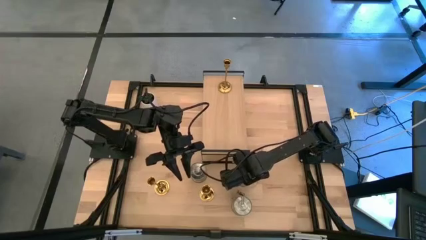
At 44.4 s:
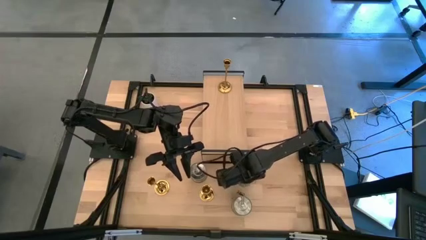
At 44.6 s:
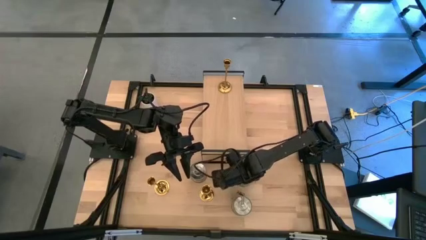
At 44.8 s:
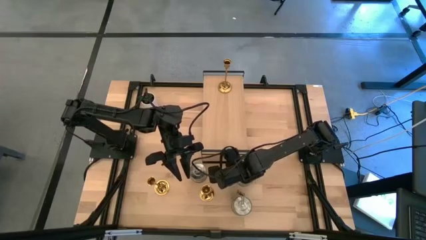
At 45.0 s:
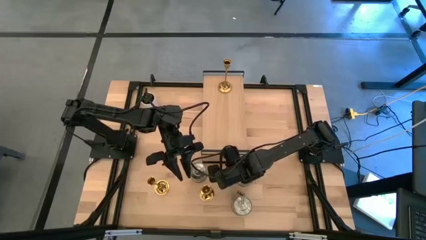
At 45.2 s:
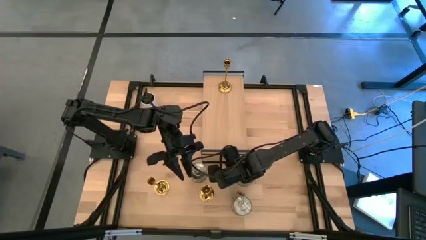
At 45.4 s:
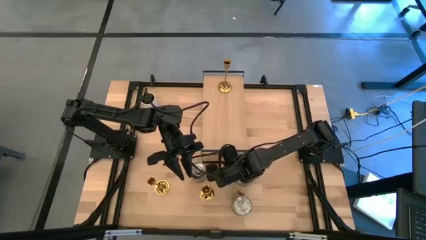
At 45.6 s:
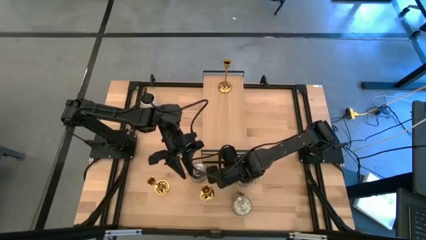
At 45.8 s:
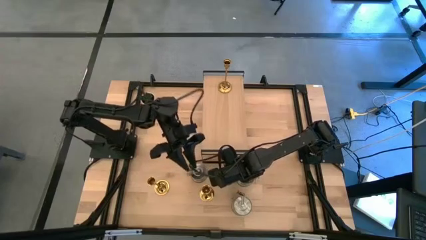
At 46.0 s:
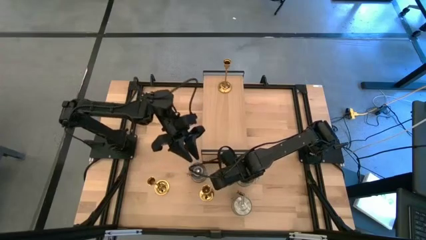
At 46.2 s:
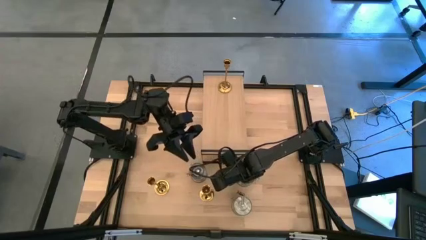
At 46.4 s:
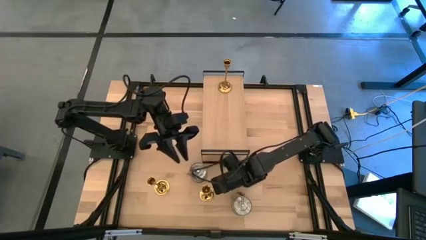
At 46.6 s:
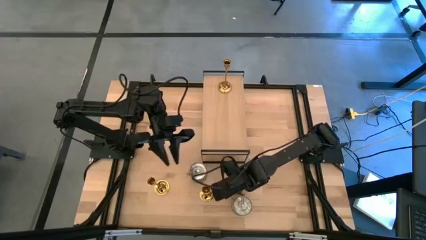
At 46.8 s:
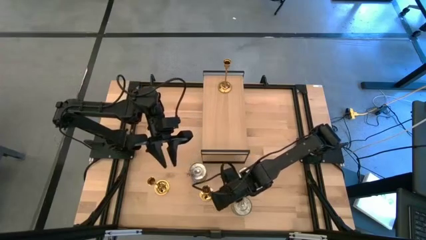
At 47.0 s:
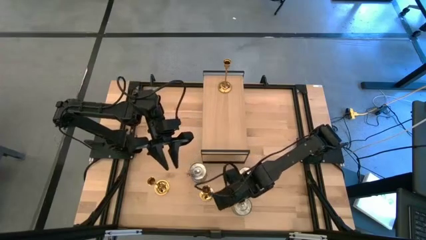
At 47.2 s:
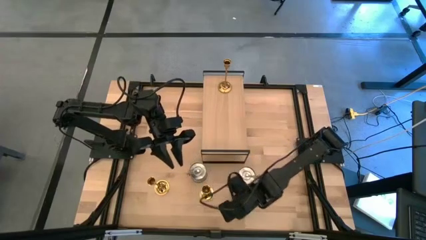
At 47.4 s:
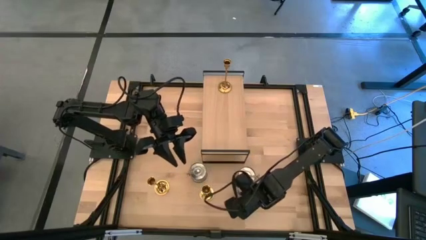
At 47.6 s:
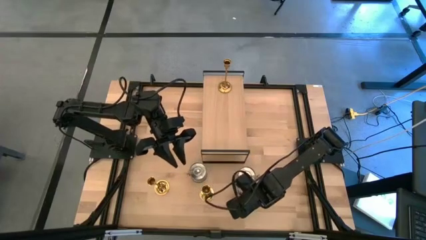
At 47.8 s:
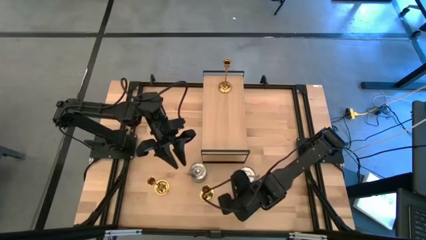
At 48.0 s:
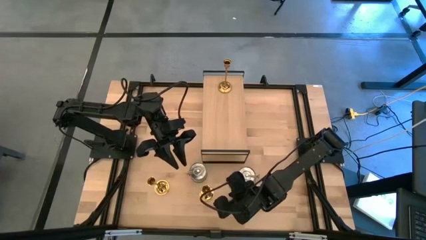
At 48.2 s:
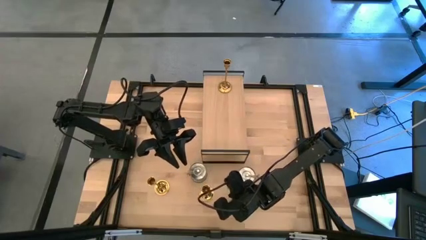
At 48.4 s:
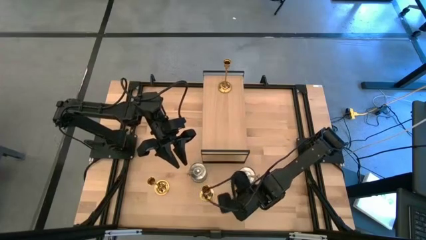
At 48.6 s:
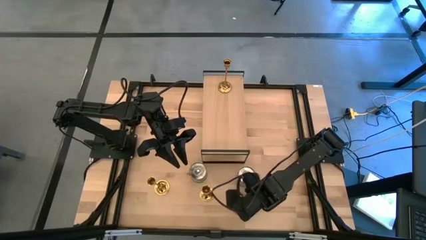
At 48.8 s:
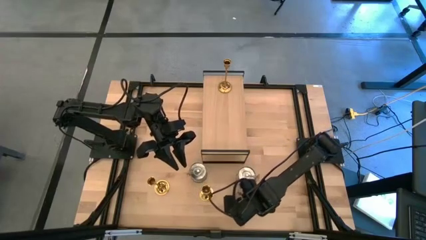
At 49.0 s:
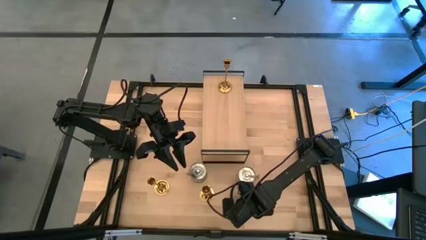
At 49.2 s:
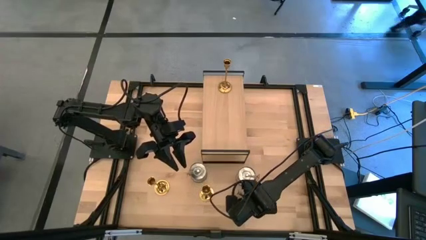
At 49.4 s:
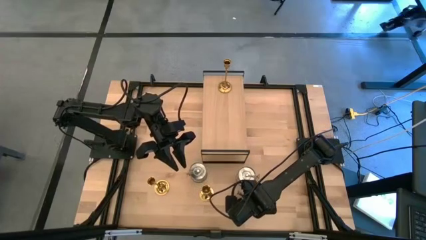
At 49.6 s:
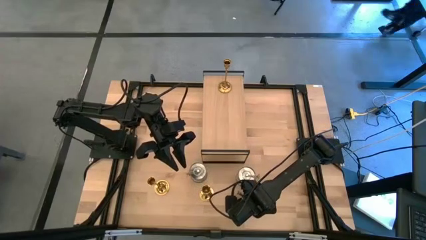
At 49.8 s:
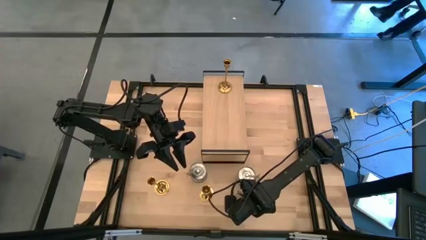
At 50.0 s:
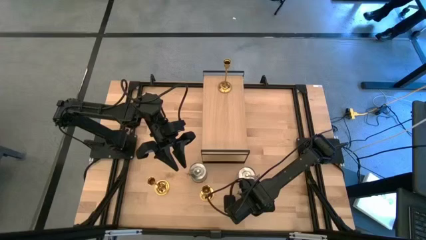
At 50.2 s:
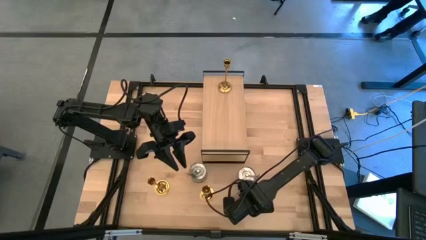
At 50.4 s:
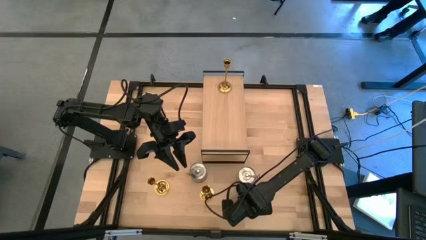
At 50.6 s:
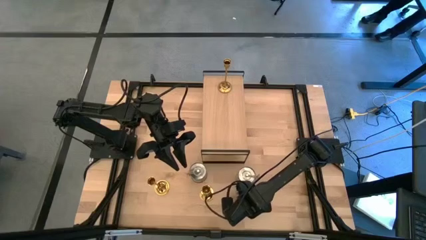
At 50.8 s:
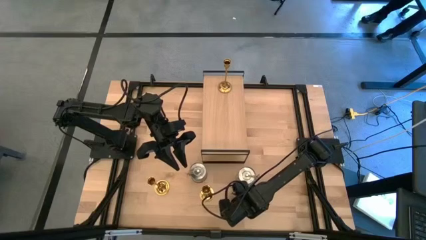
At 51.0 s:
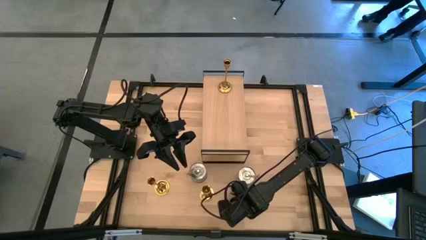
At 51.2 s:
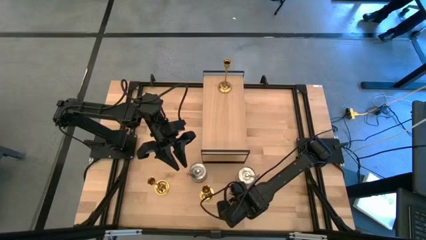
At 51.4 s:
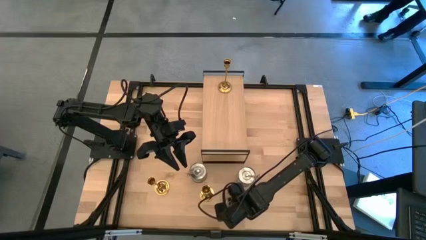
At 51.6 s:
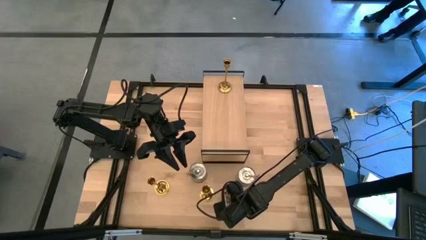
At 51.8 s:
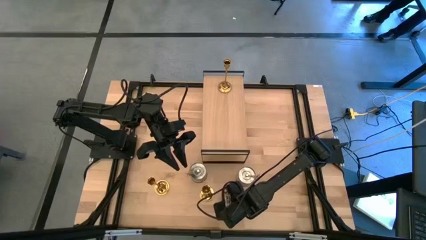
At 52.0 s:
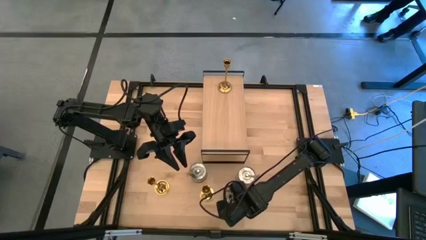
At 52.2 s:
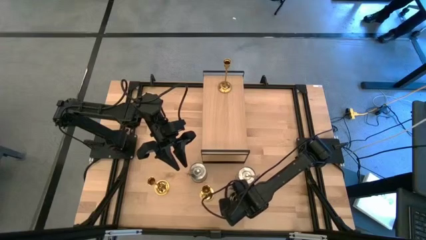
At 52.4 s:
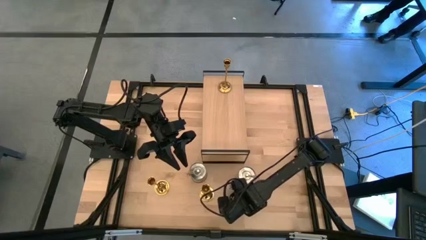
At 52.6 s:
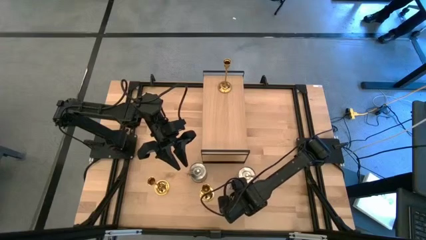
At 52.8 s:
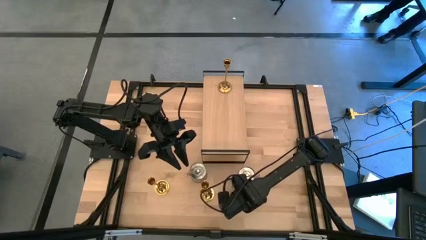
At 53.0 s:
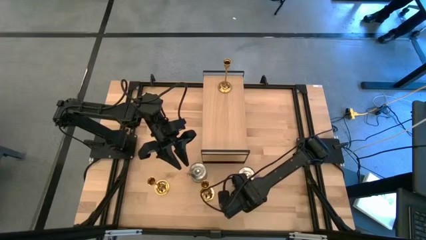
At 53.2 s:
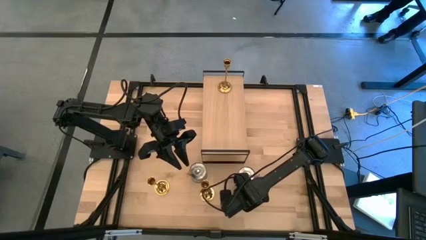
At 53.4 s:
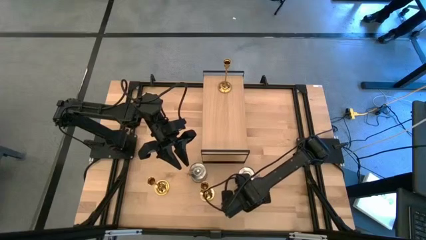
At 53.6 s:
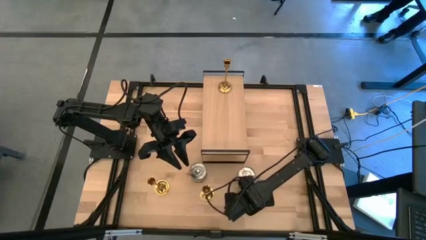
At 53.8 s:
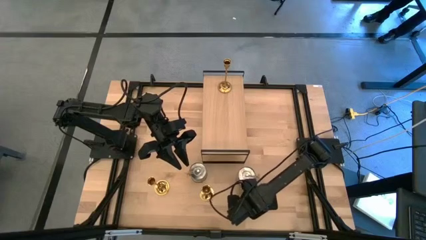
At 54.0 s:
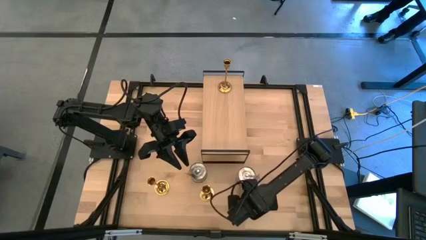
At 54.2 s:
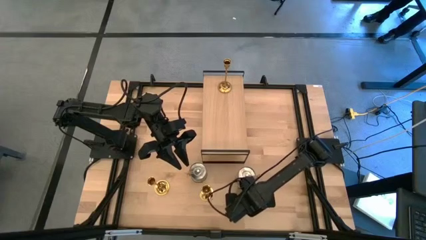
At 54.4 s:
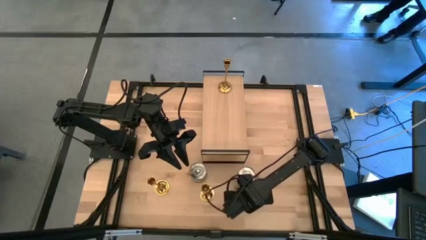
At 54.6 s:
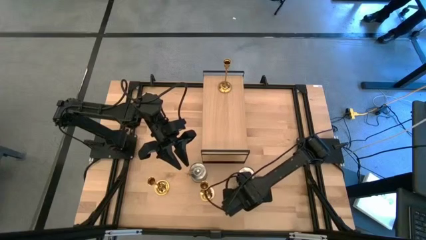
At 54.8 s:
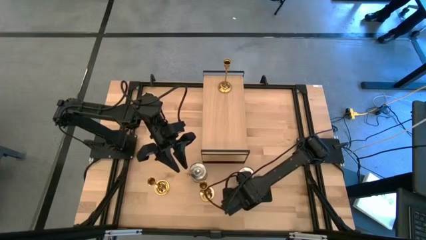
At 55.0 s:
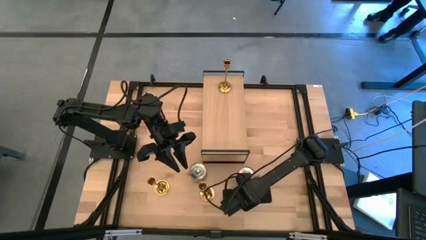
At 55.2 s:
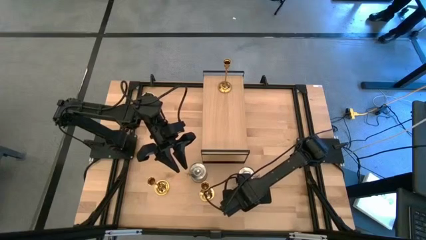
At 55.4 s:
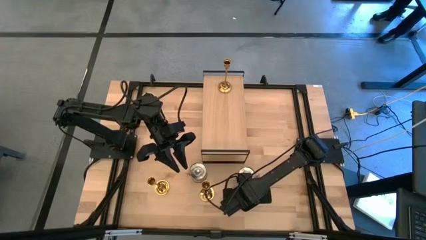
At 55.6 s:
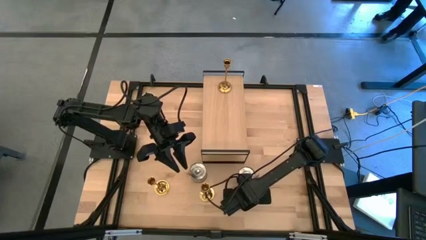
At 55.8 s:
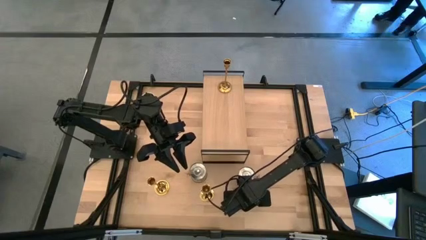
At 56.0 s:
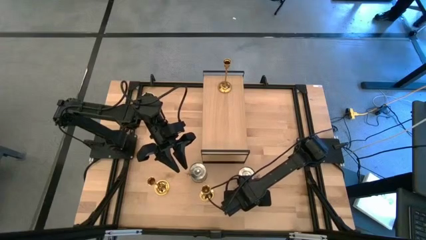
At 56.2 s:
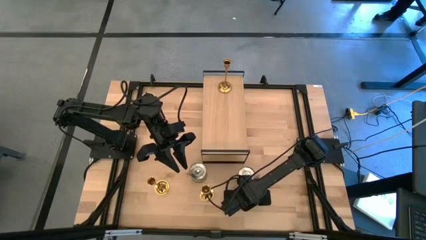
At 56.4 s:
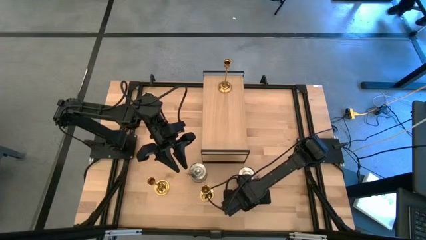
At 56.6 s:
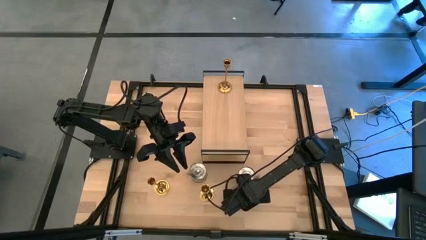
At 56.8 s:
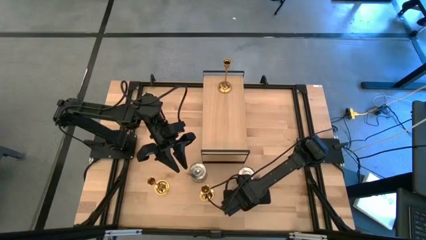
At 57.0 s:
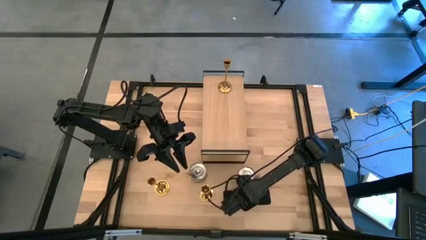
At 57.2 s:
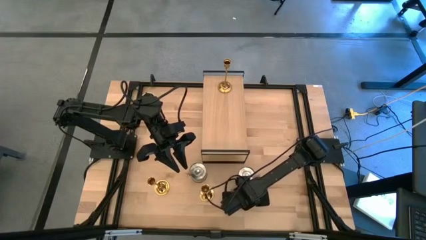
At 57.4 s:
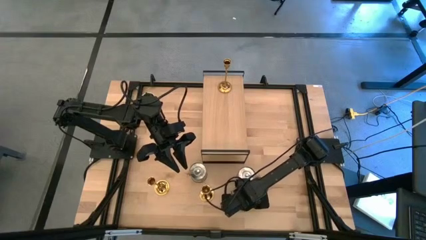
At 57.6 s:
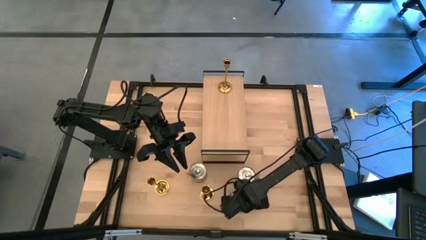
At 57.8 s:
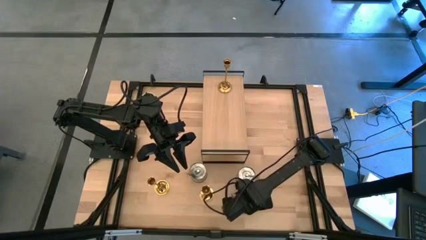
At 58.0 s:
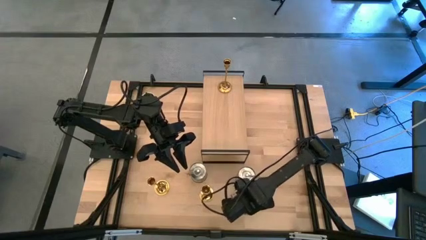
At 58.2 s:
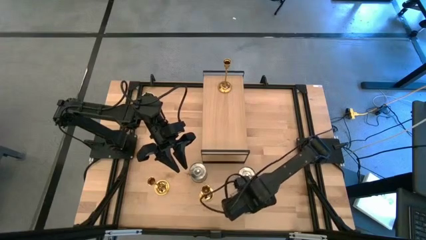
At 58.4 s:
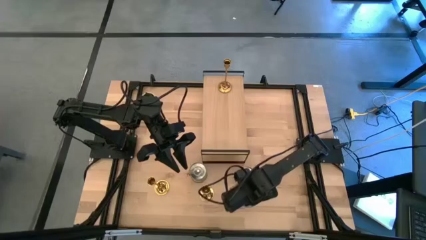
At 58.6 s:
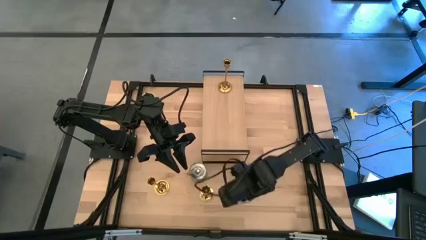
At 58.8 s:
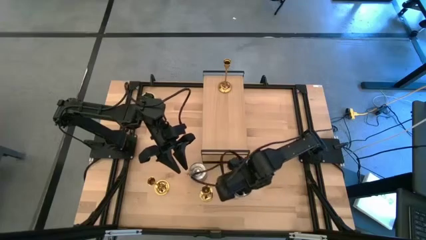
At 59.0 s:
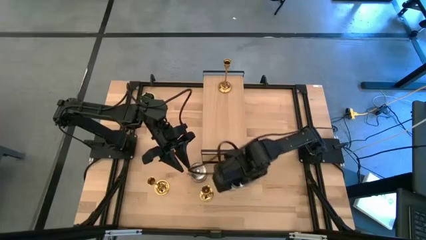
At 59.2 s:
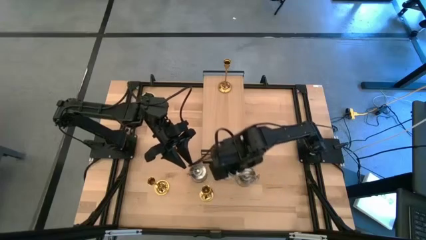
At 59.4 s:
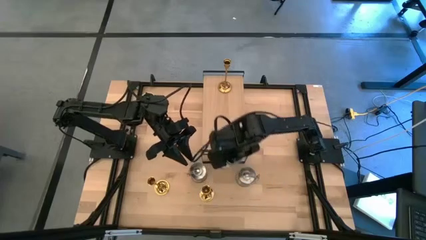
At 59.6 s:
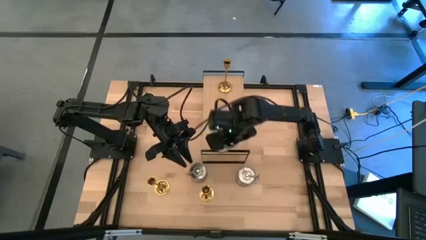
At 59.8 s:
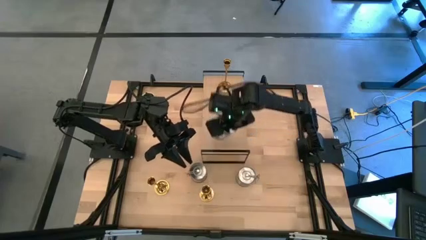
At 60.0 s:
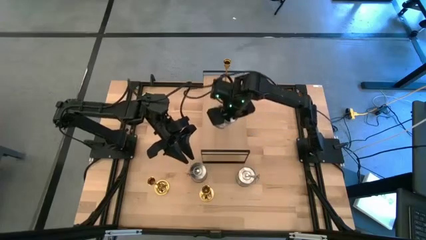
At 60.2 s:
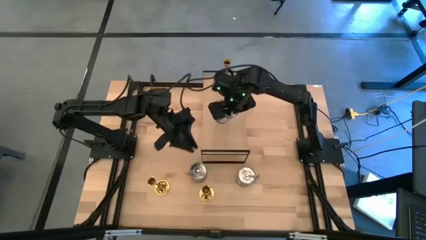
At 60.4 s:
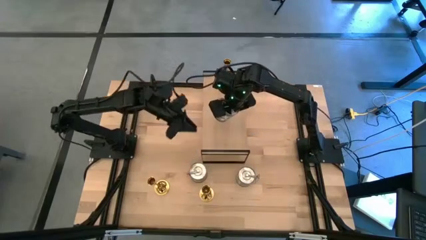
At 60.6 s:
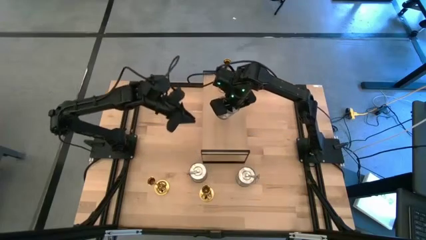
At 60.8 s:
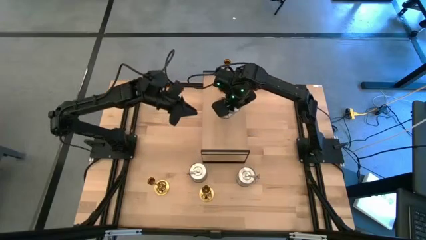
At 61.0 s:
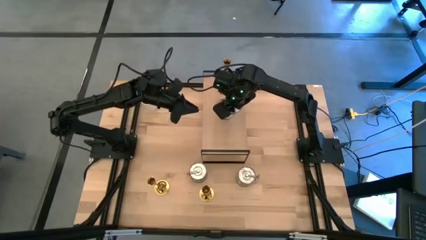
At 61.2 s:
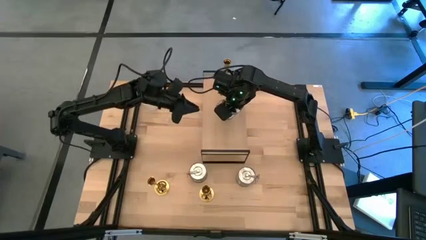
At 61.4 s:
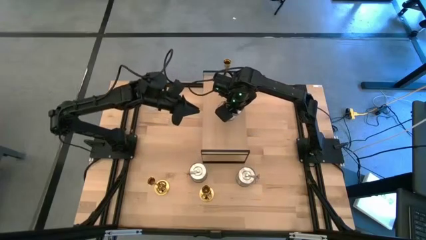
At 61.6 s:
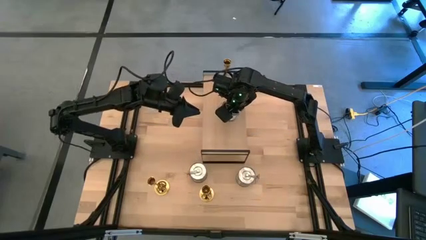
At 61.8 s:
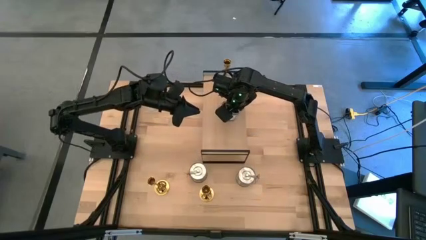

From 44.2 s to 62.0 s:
Task: Pick & Place candle stick holders
Put the bottom silver scented candle on the shelf
